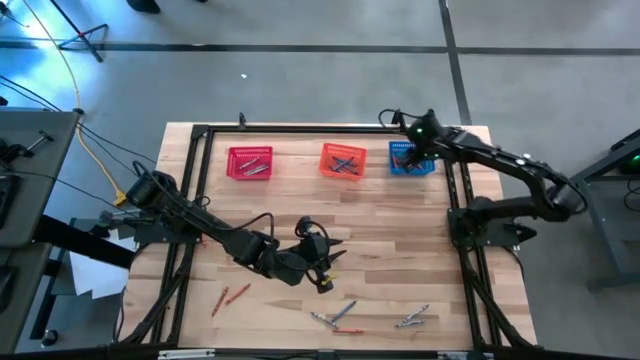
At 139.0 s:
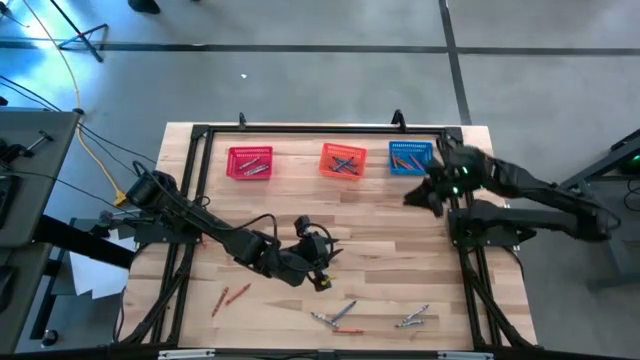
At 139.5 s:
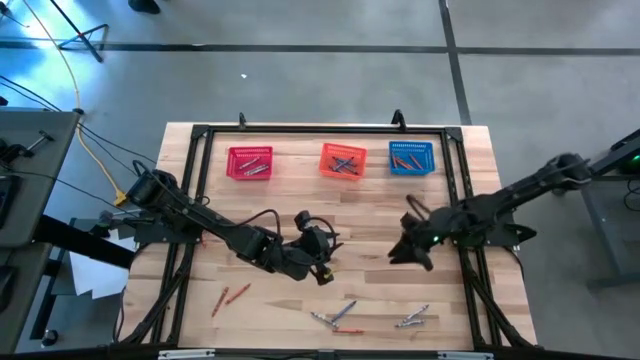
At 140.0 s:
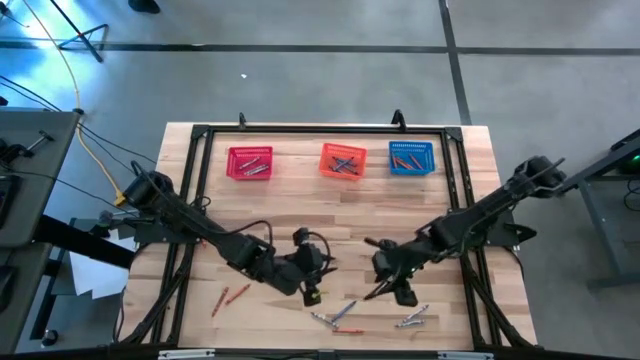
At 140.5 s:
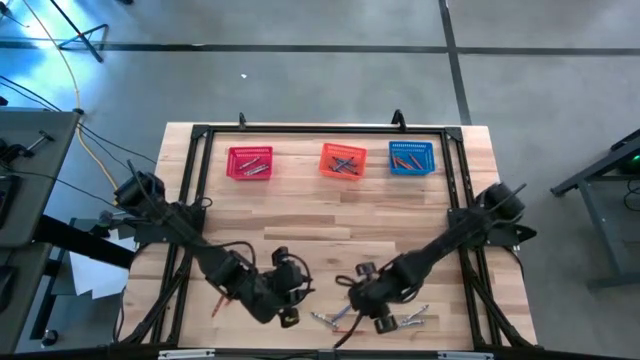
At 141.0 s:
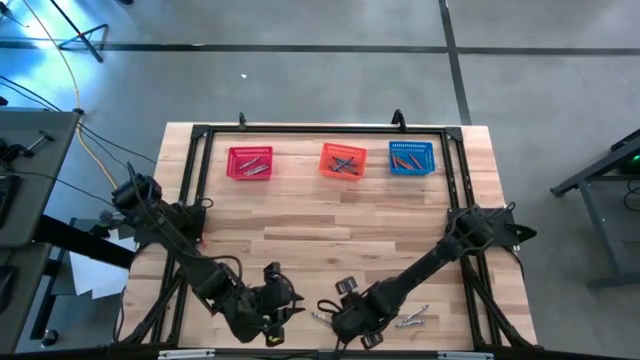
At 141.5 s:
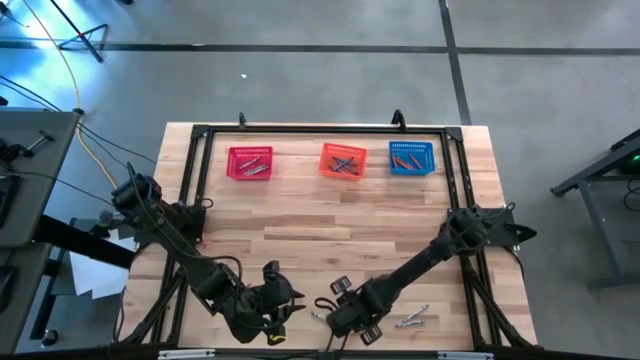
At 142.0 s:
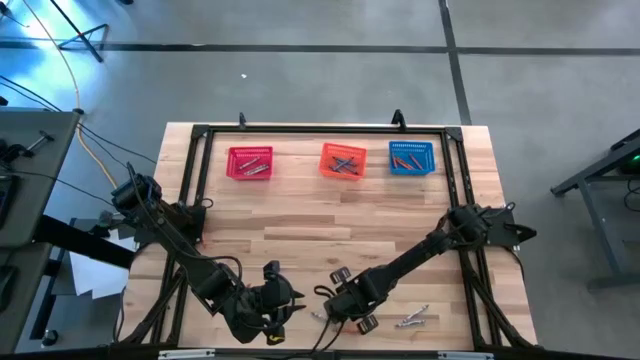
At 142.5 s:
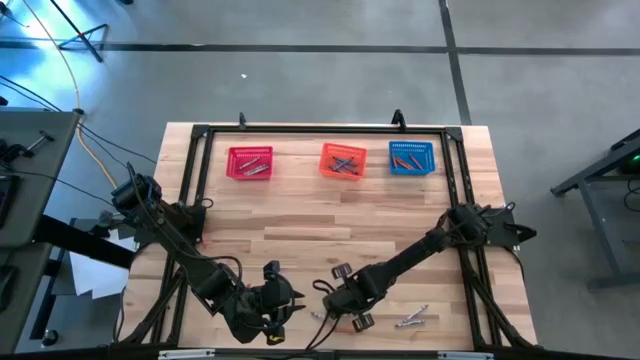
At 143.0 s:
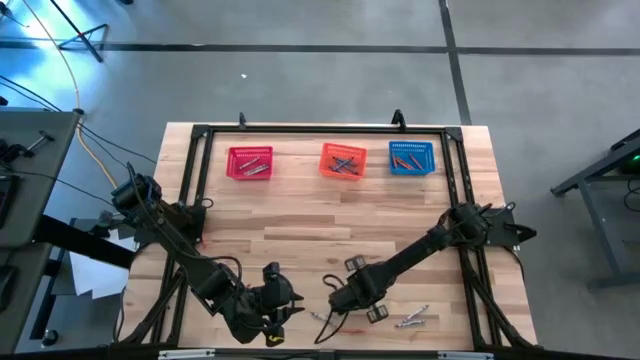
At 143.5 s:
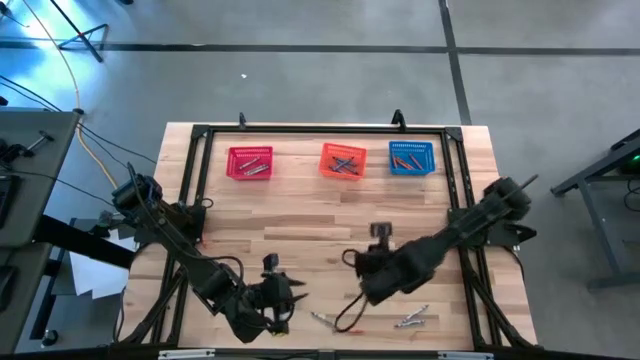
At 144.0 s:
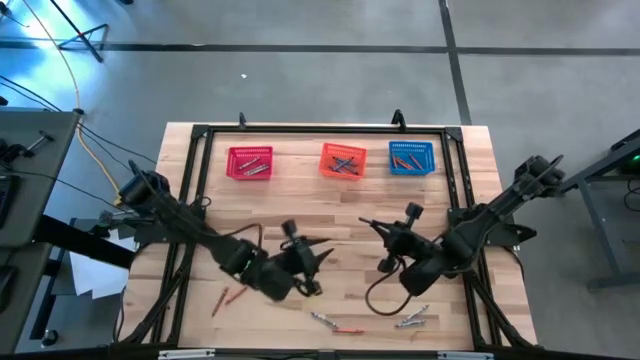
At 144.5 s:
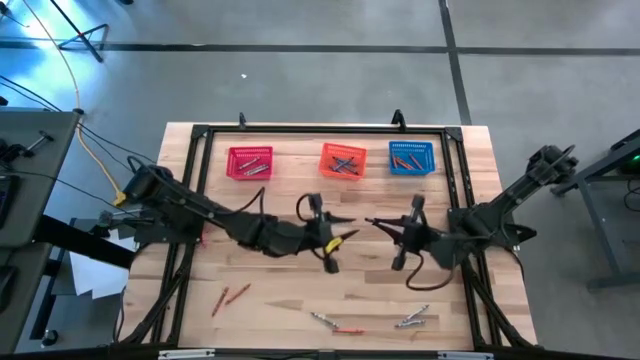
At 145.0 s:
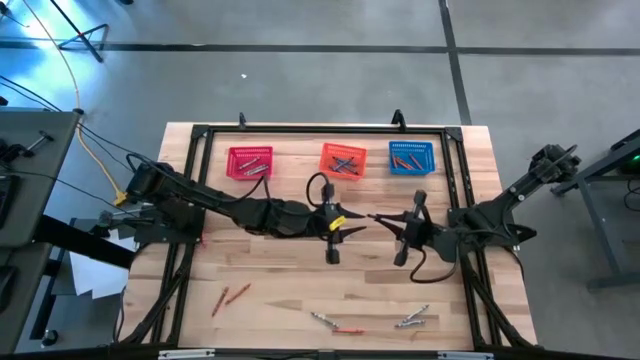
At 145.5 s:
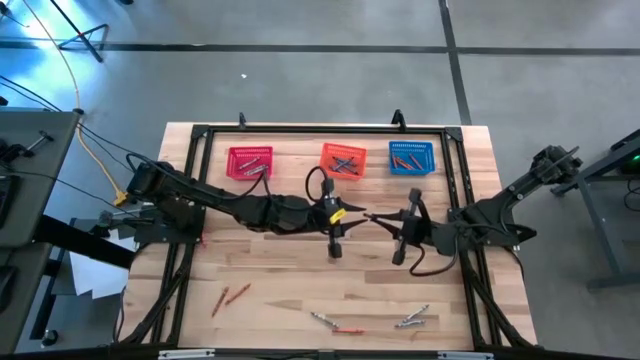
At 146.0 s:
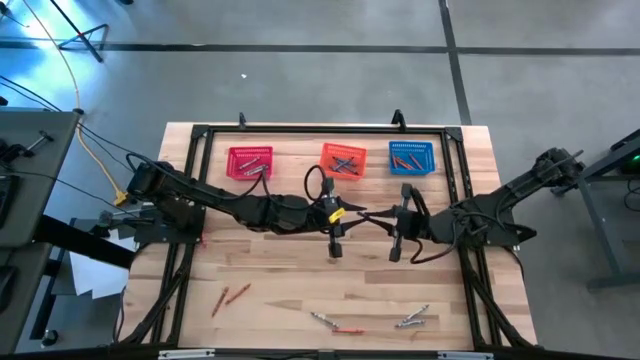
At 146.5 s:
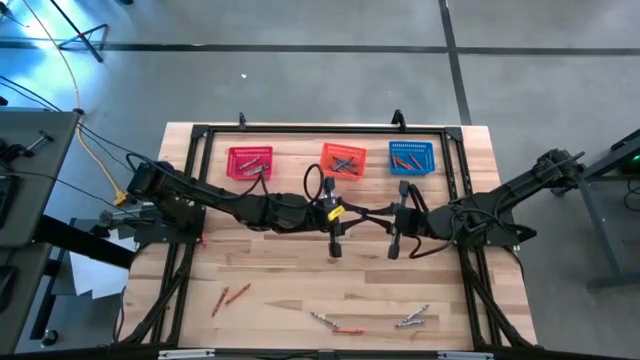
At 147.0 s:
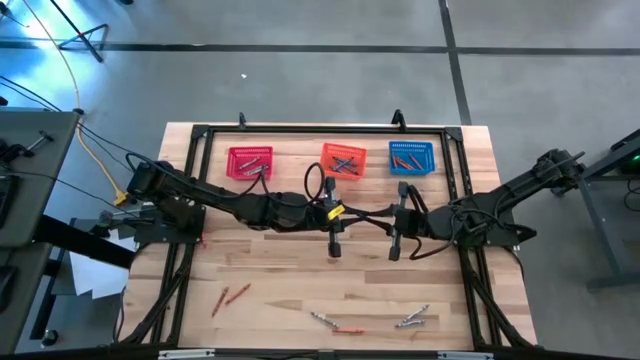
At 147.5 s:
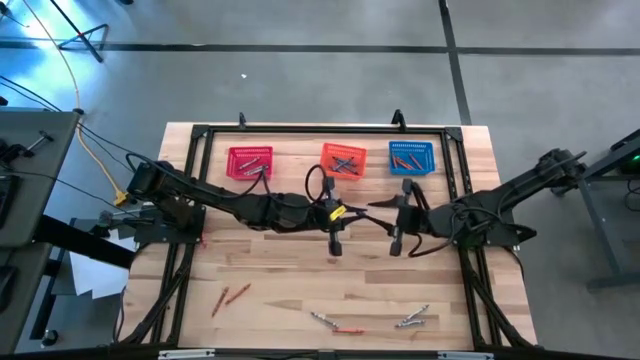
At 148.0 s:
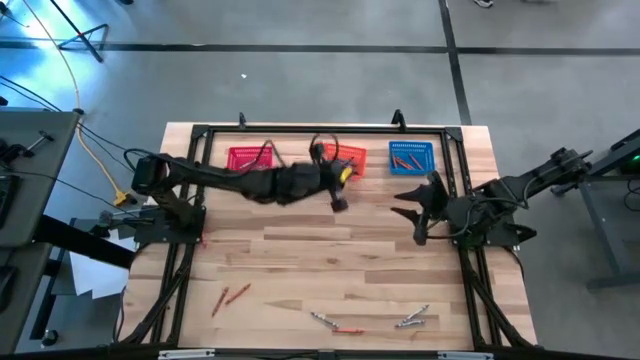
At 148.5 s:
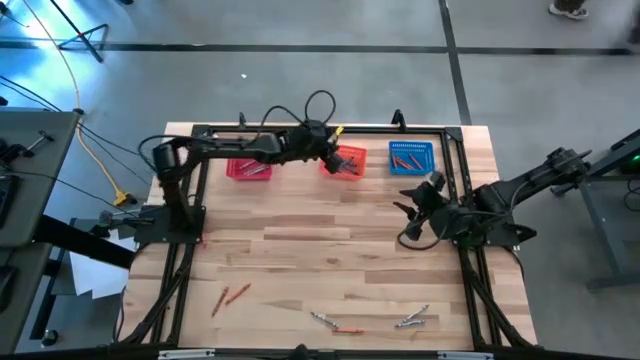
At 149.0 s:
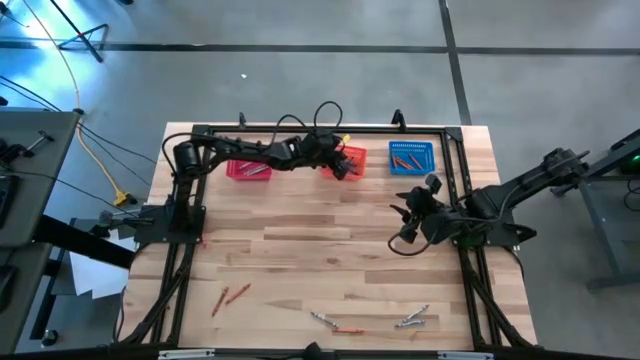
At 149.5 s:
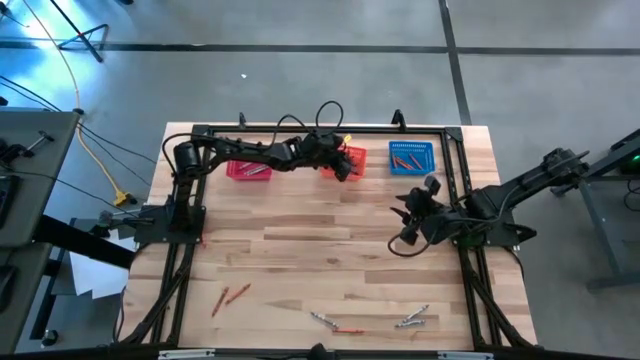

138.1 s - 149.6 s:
Task: Sort crayons
Put the blue crayon into the orange bin

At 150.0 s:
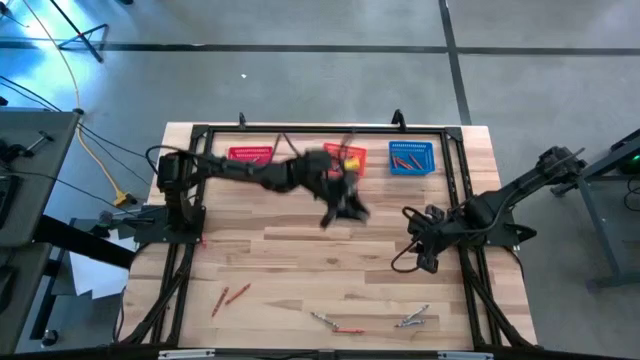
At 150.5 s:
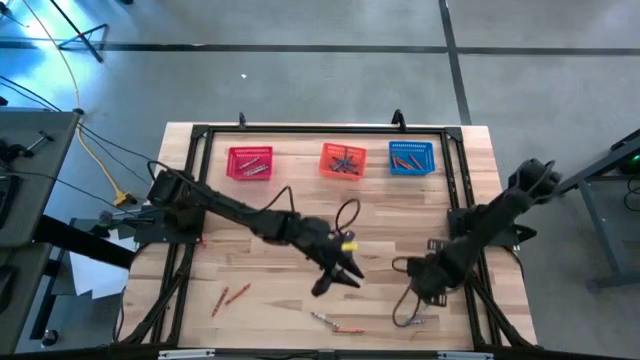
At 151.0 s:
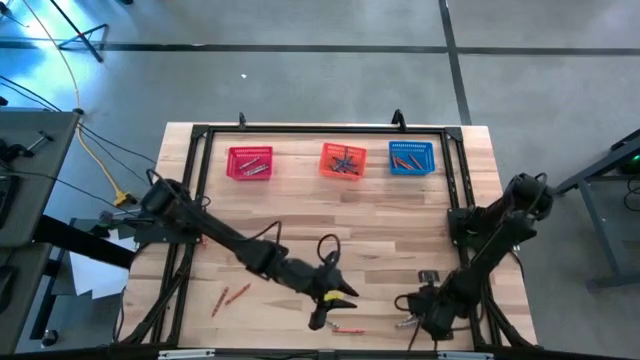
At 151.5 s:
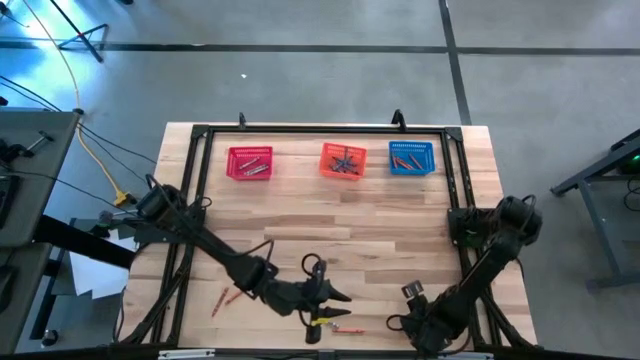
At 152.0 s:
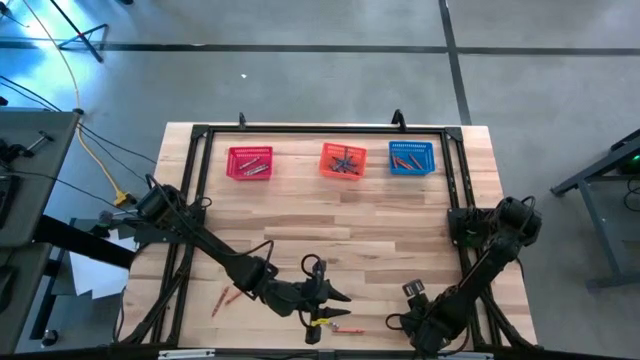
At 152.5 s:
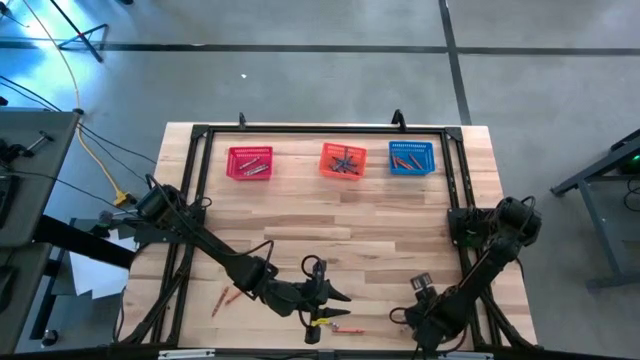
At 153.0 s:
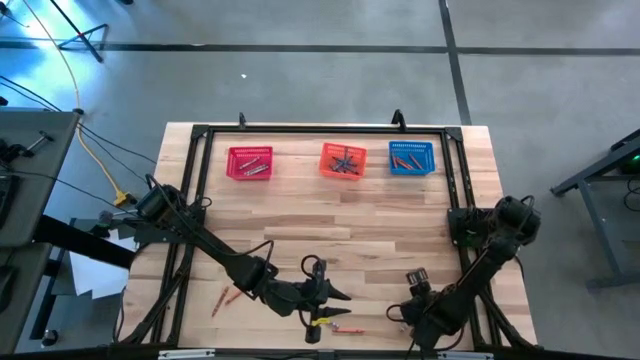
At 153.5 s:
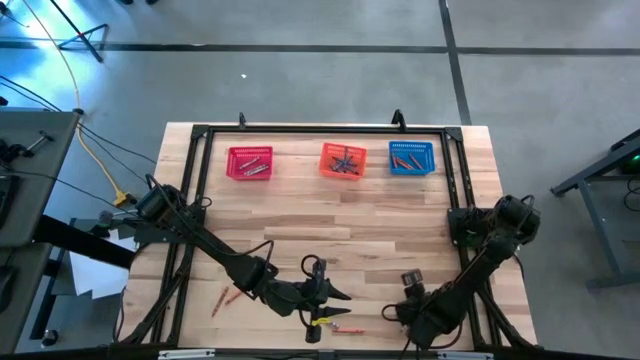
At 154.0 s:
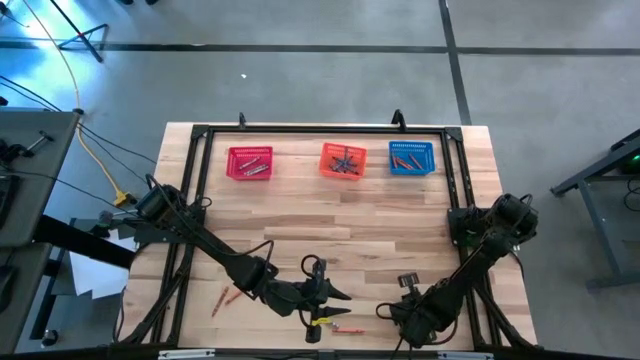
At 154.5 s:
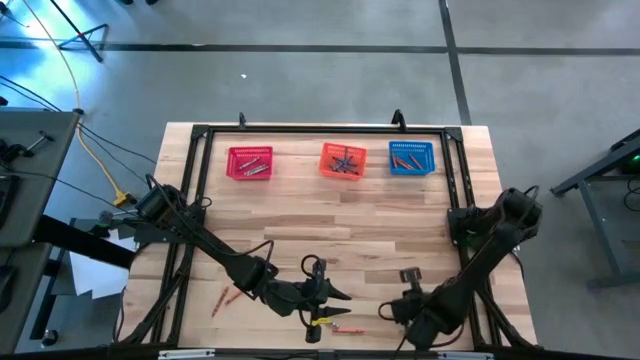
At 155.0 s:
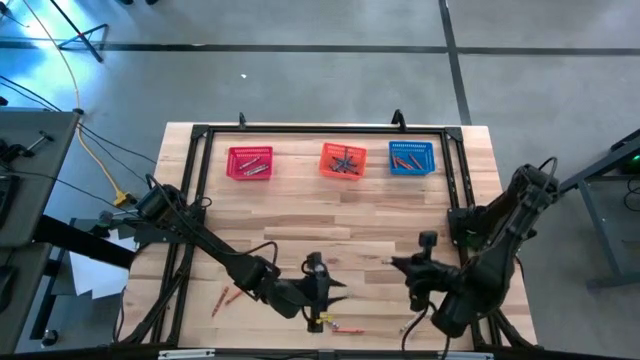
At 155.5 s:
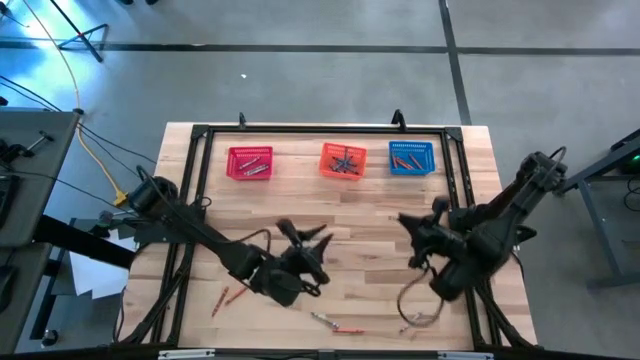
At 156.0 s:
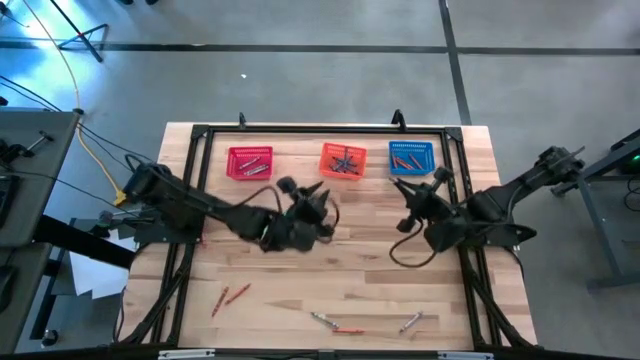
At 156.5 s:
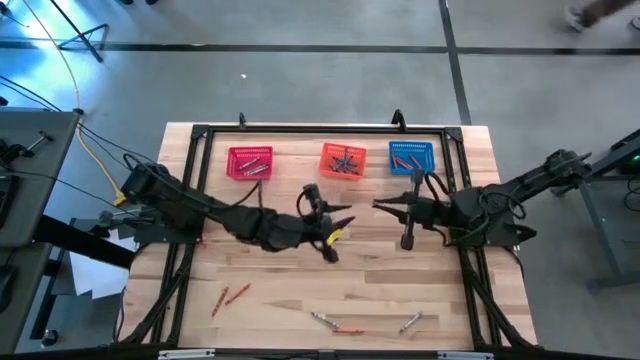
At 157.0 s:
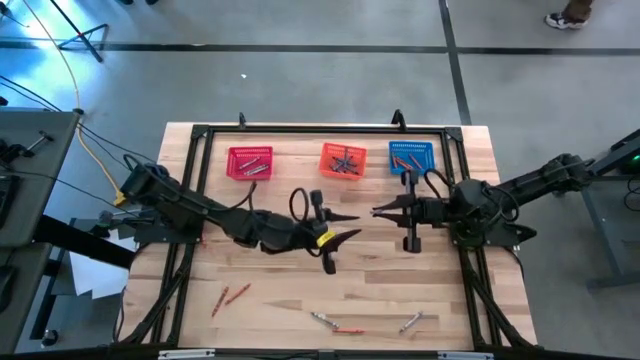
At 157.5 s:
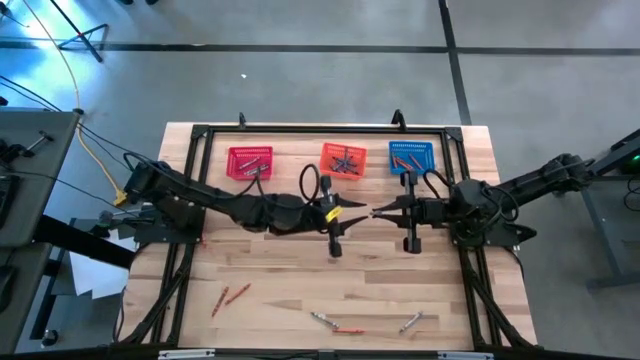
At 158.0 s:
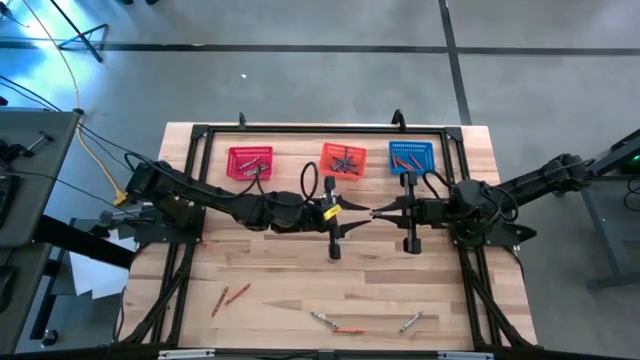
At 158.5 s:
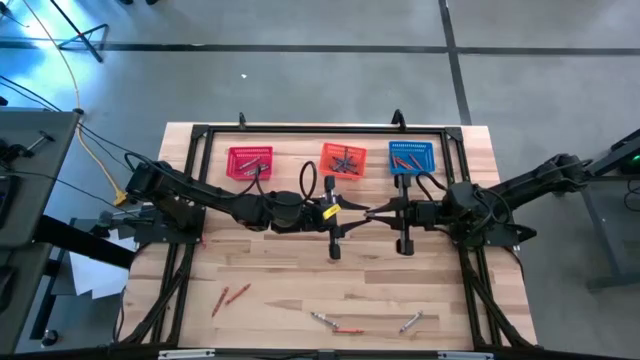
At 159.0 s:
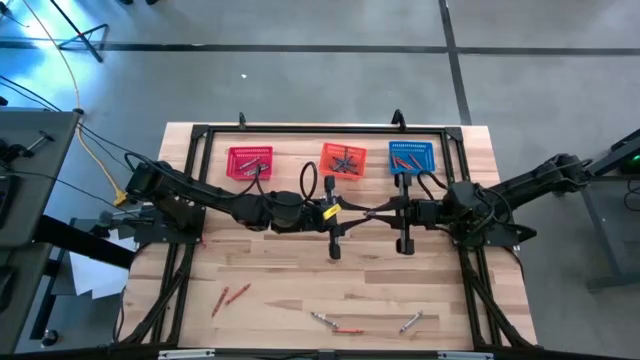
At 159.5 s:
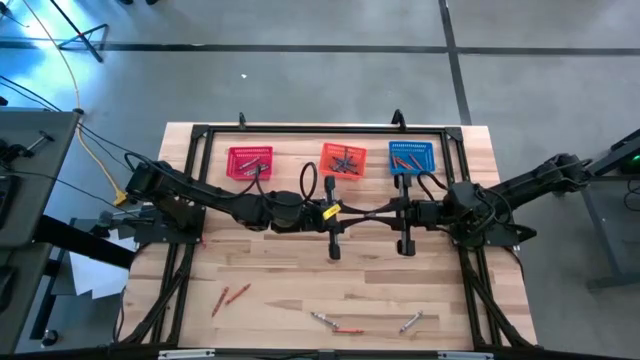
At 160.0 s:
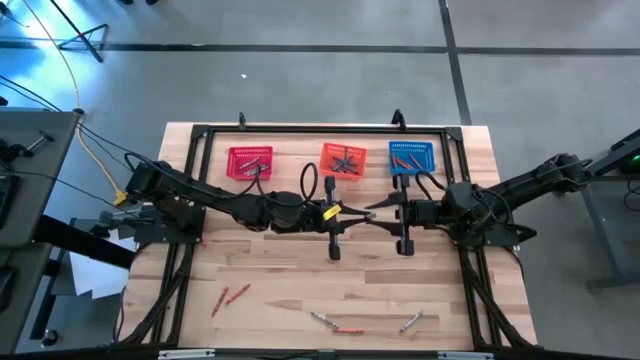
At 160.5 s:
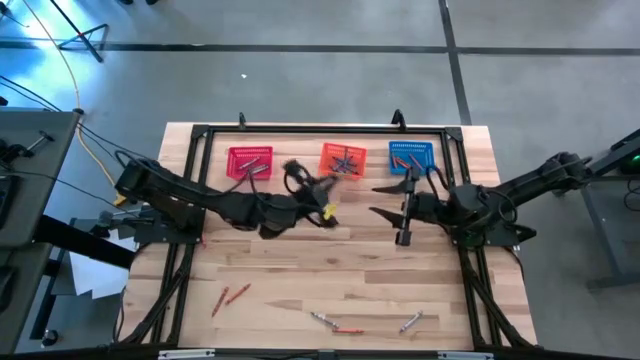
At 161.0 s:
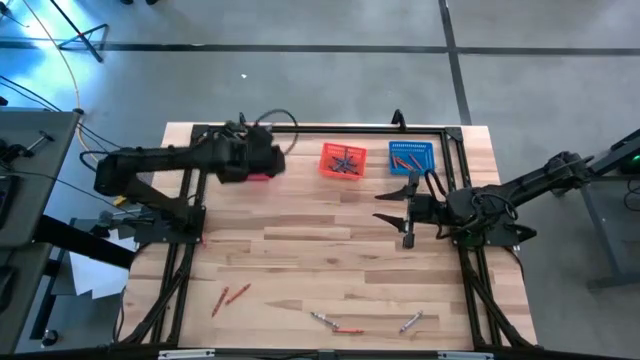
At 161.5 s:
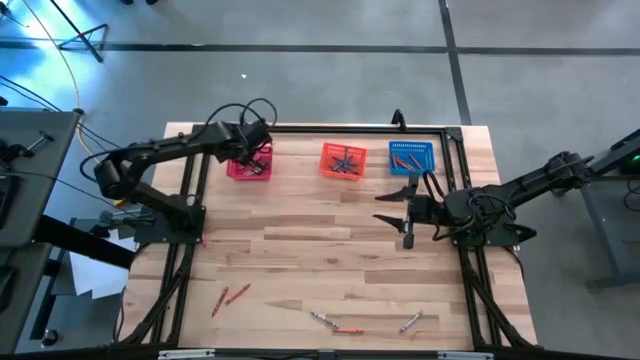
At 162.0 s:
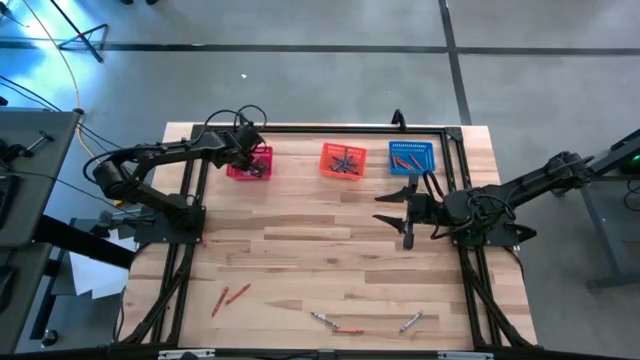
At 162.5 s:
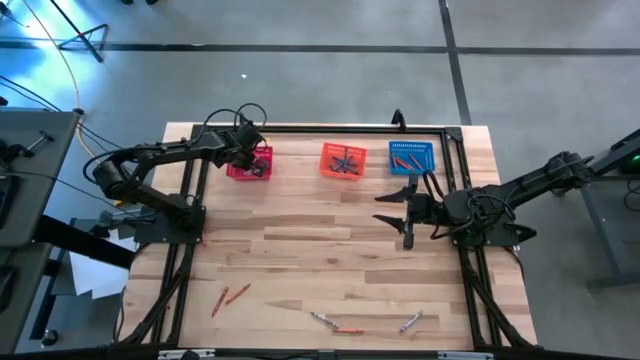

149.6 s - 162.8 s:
Put the gray crayon into the red bin
